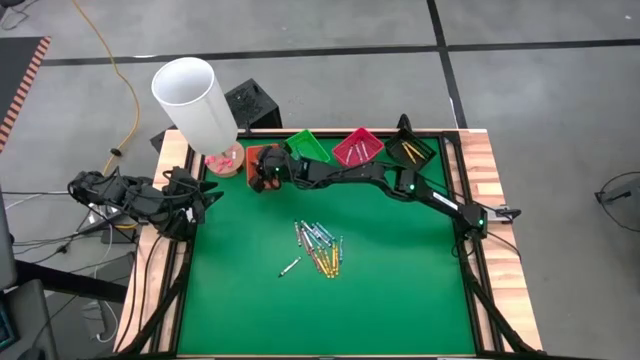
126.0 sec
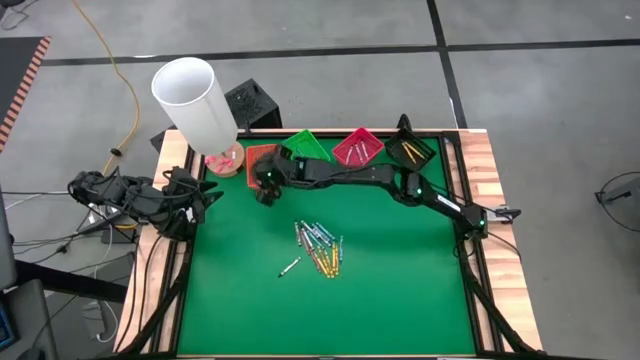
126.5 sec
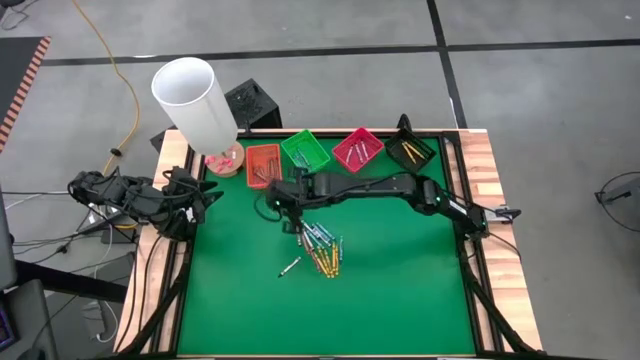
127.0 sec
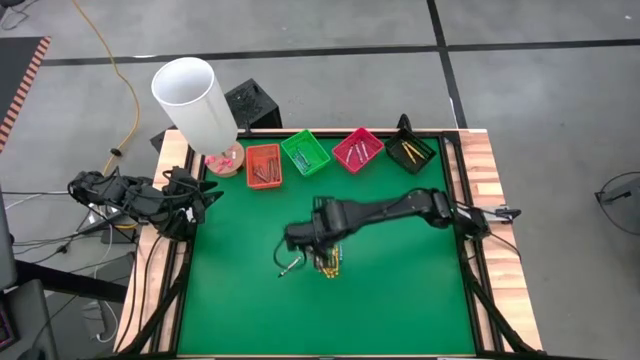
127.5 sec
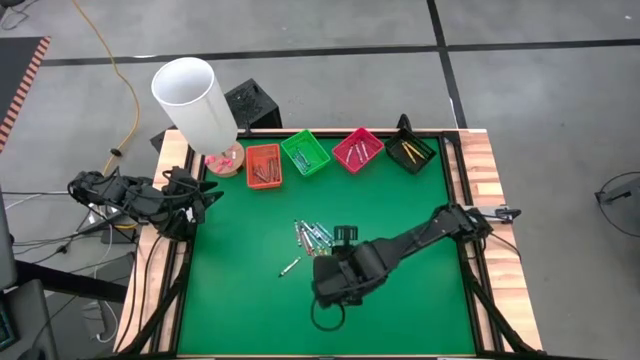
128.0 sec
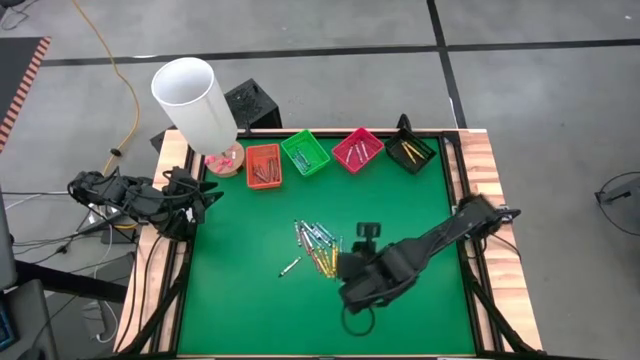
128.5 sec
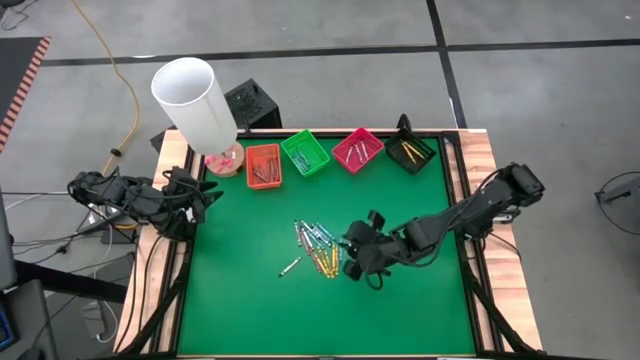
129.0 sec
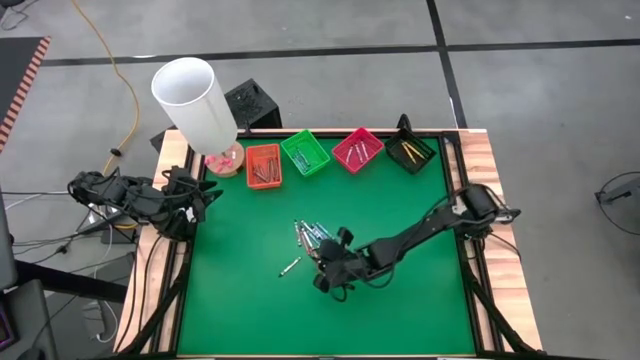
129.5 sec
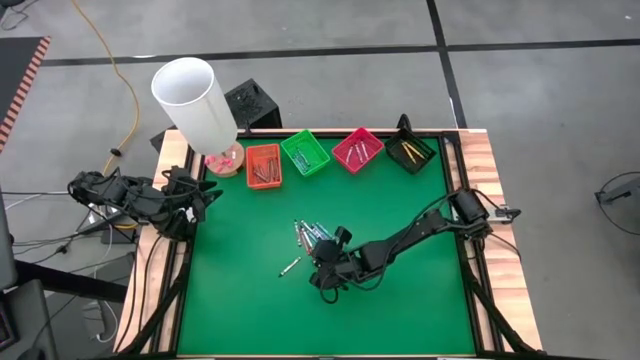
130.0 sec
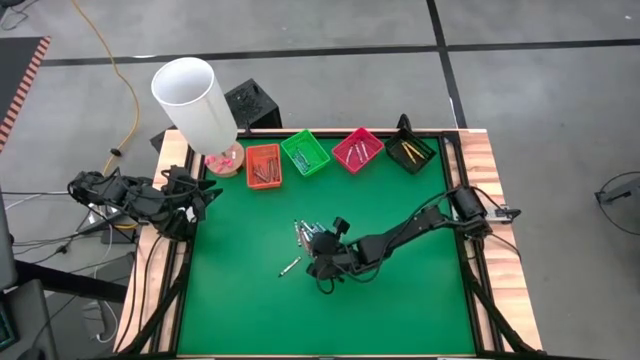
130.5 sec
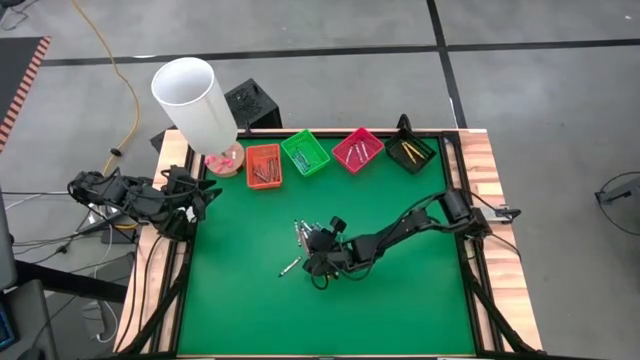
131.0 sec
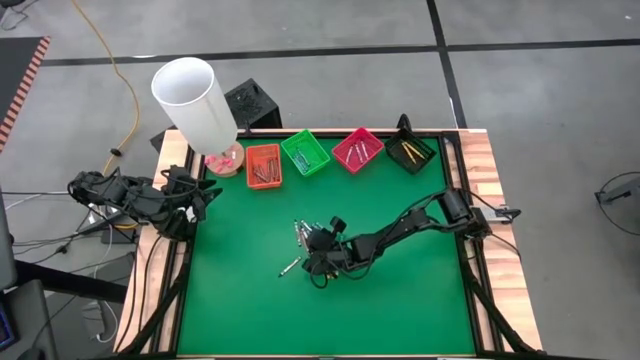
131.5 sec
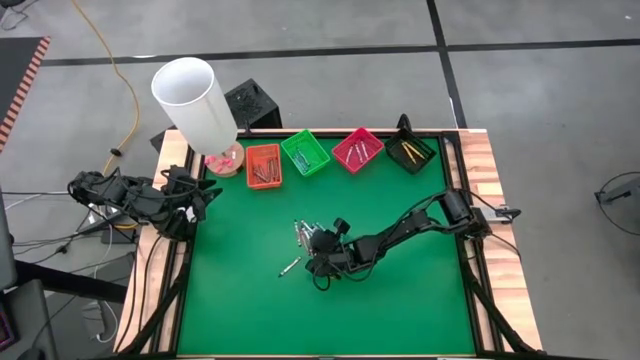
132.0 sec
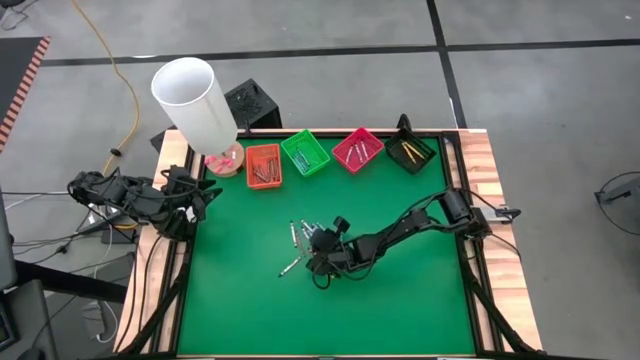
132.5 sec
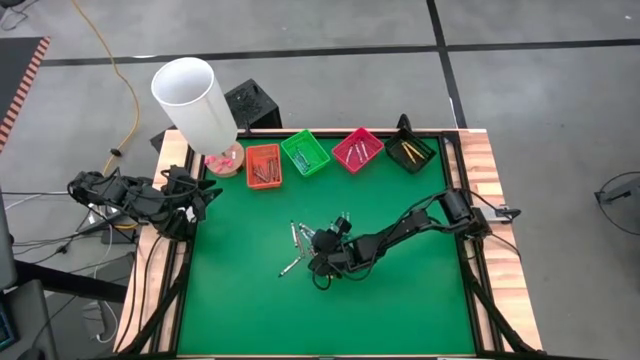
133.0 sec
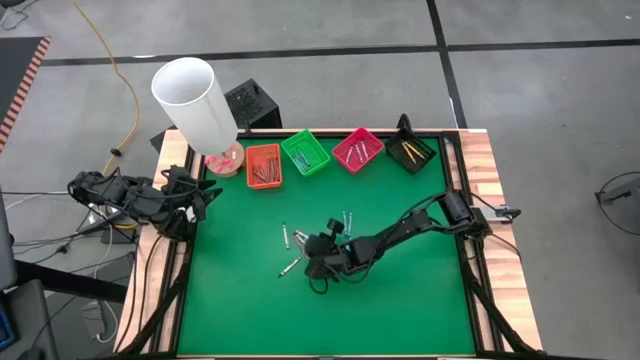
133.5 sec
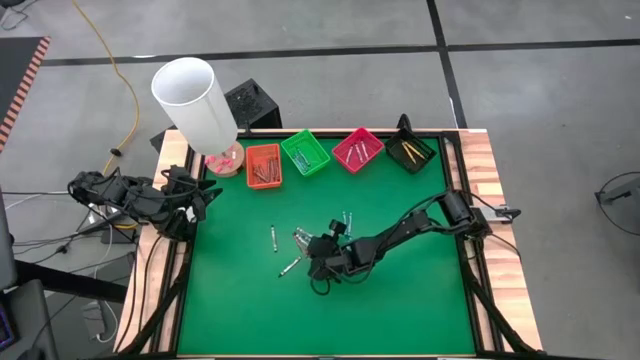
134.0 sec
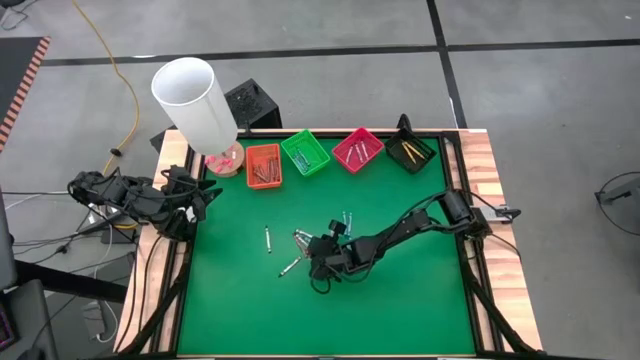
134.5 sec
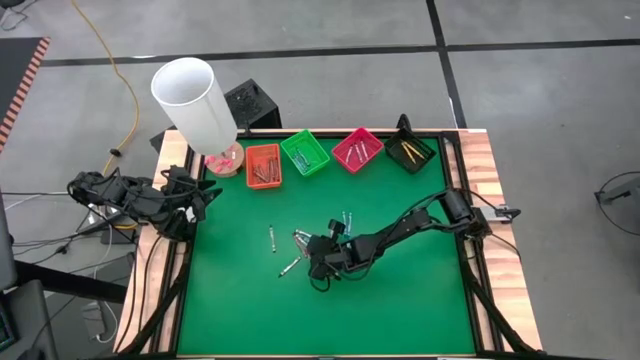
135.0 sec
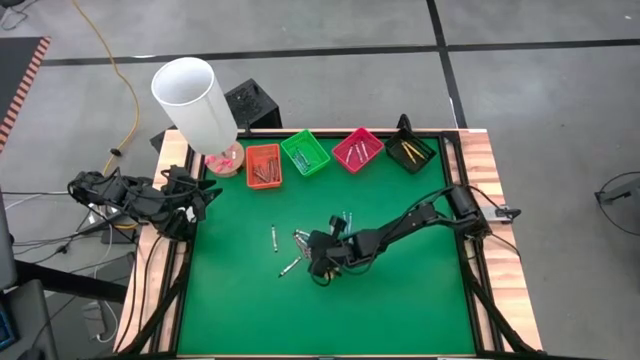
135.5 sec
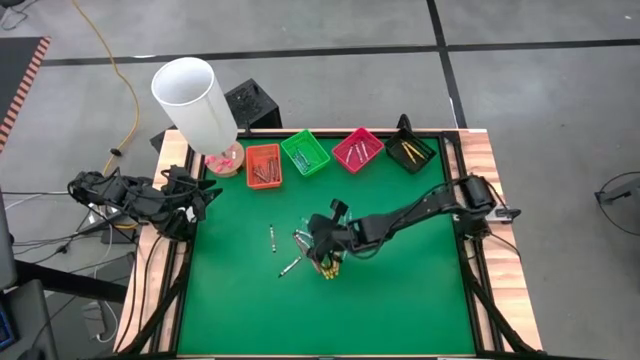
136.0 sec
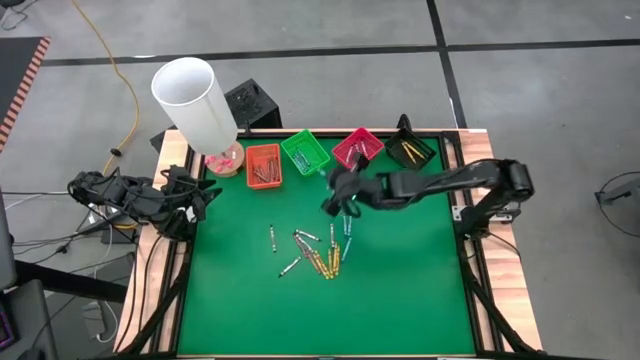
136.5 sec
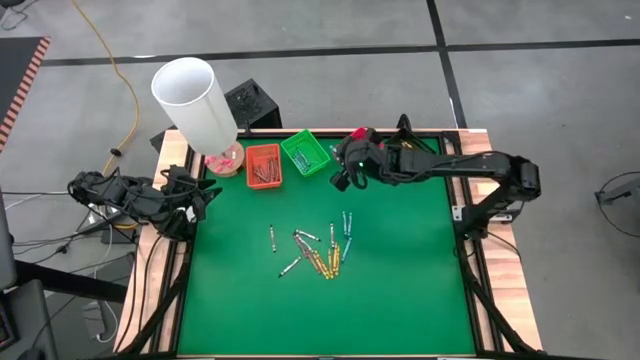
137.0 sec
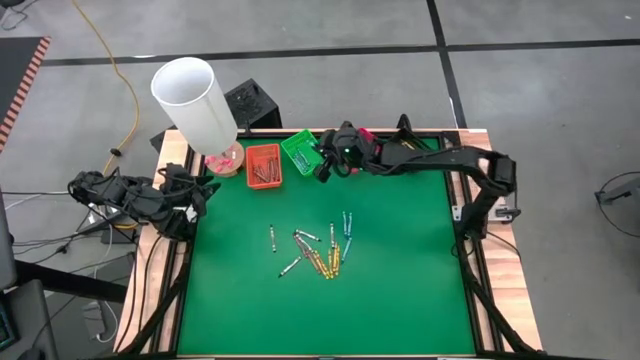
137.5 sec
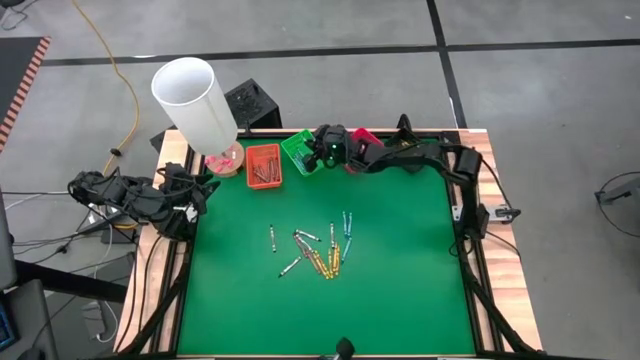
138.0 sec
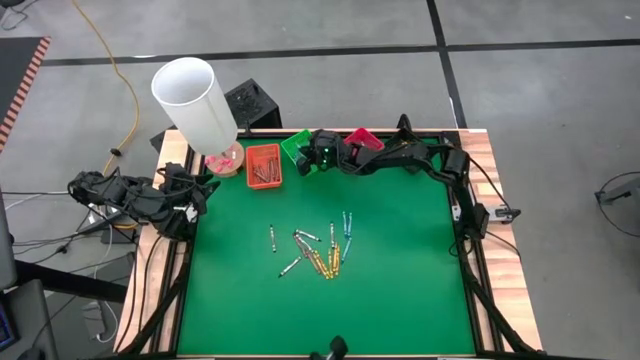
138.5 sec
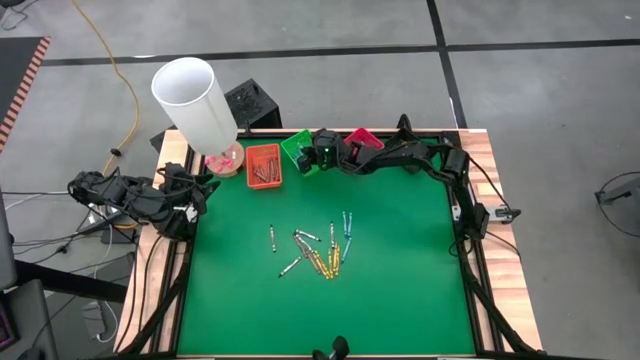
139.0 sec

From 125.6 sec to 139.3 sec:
Task: Sort crayons
Put the blue/green crayon into the green bin

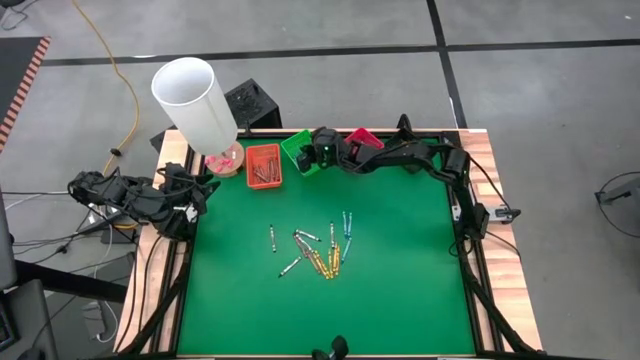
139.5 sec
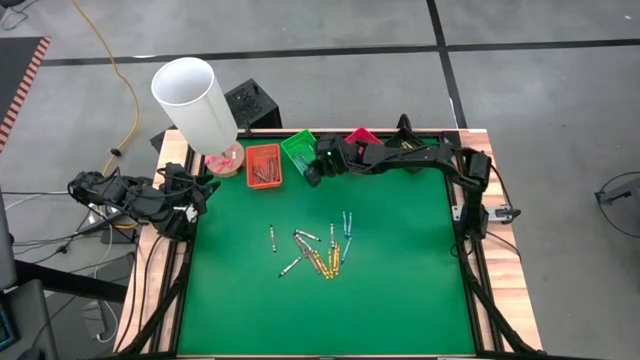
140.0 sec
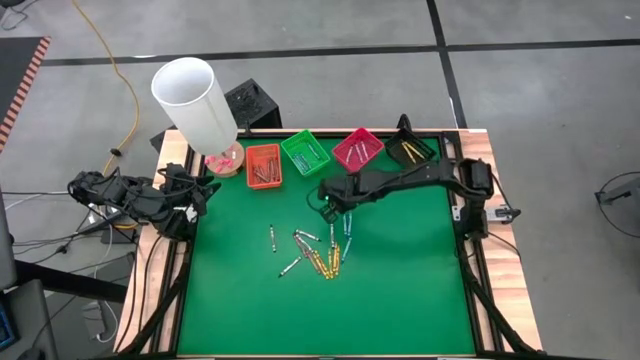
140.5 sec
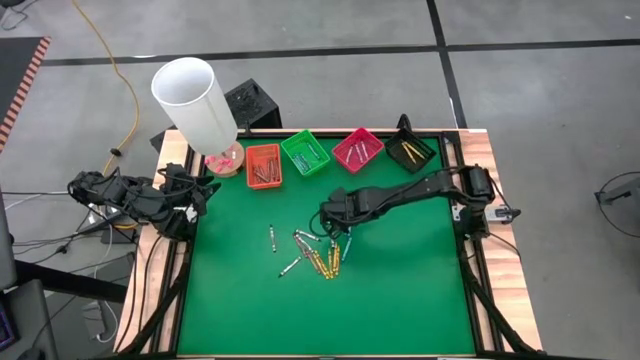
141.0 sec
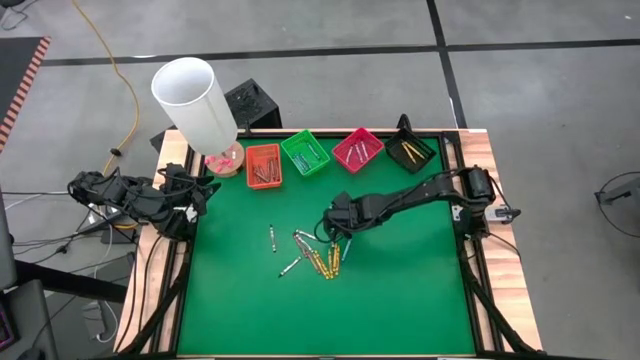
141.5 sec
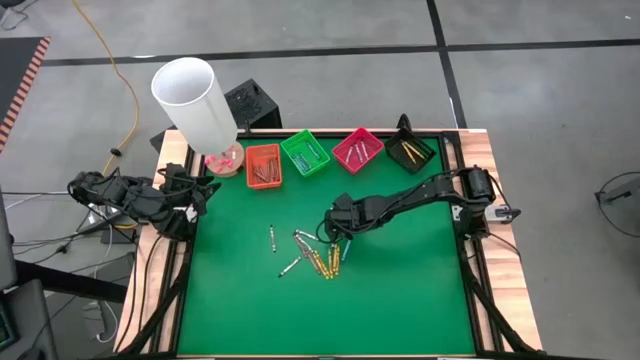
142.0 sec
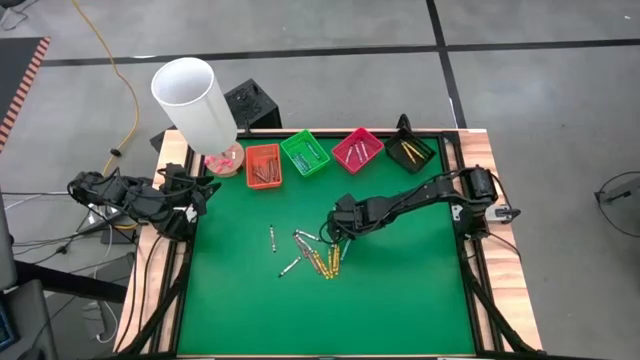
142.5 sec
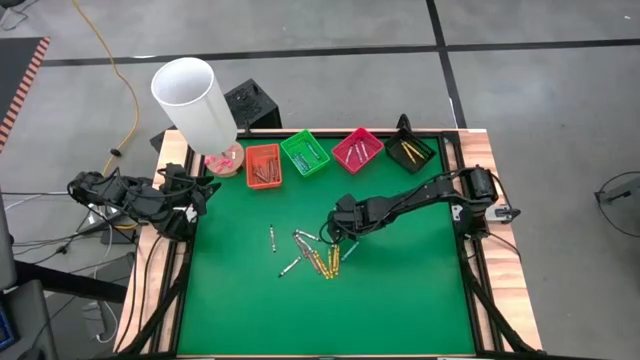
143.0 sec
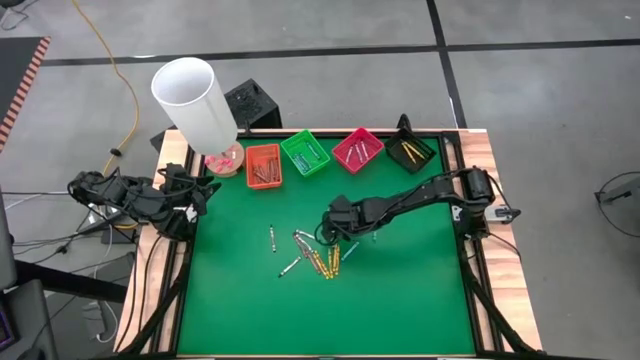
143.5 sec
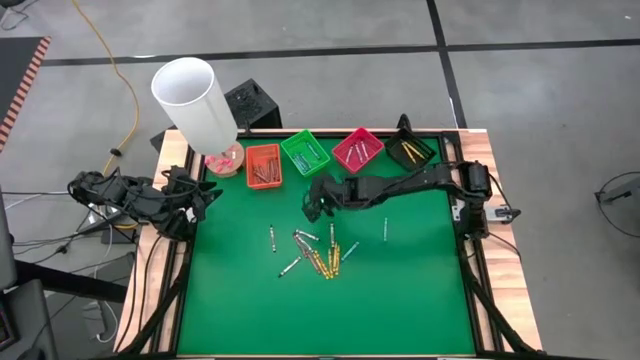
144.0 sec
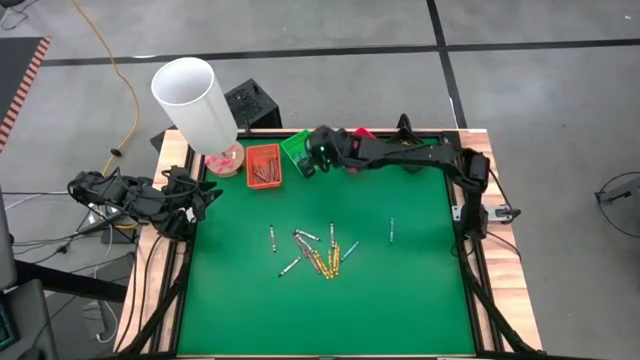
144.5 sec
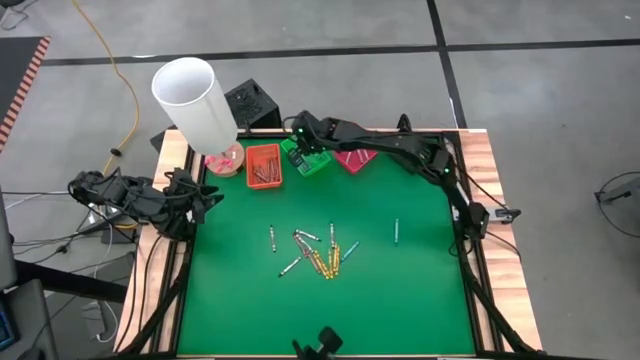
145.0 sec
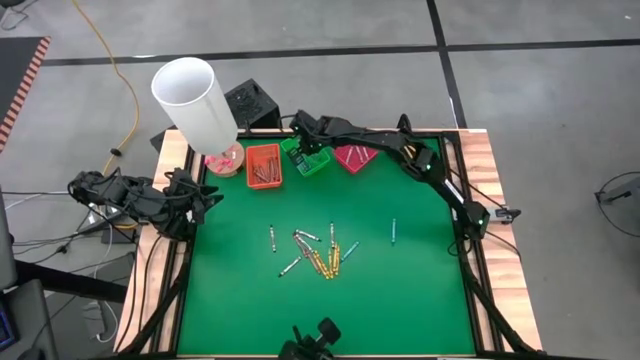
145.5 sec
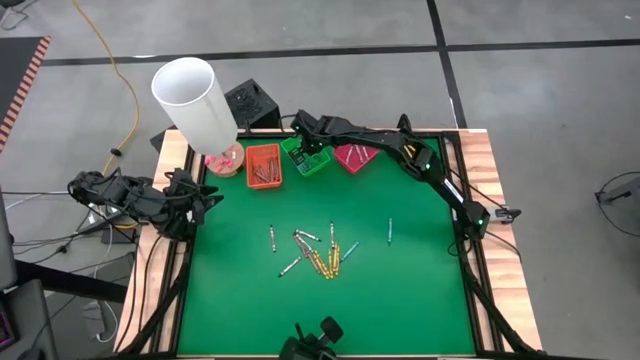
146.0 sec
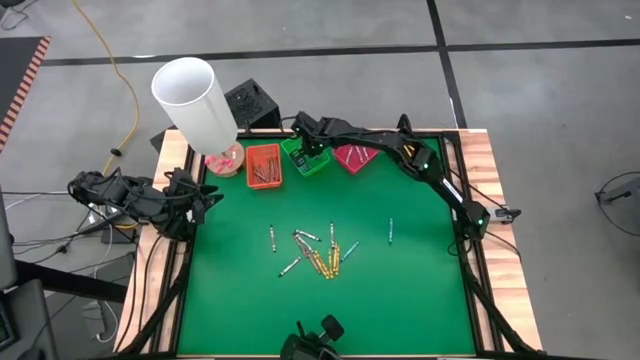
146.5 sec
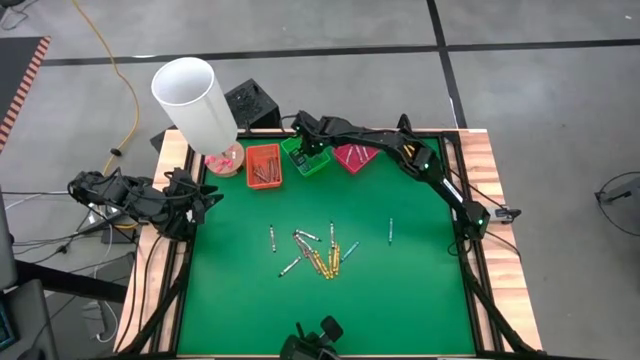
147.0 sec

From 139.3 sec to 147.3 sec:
Put the blue/green crayon into the green bin
